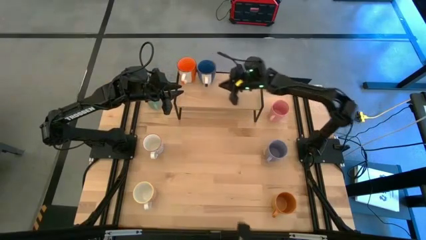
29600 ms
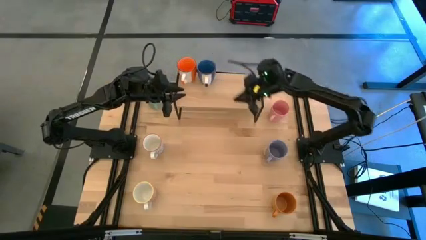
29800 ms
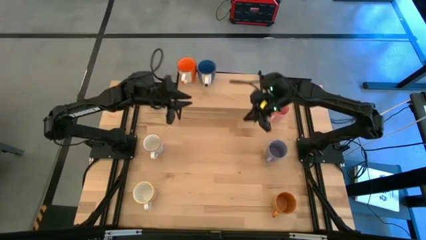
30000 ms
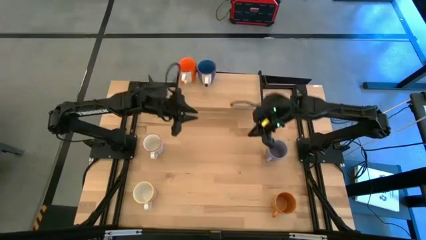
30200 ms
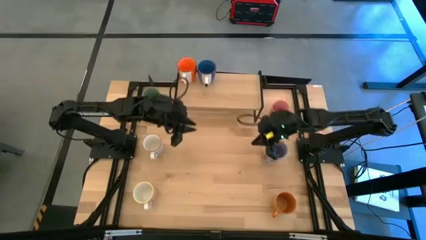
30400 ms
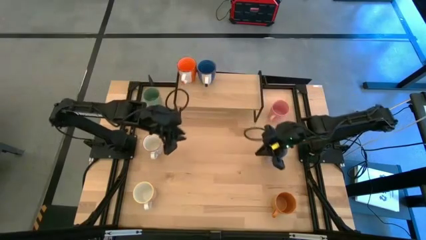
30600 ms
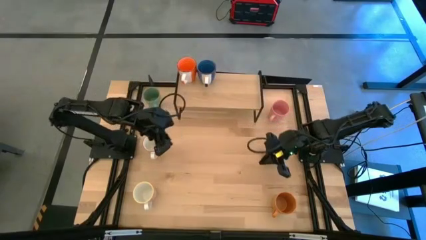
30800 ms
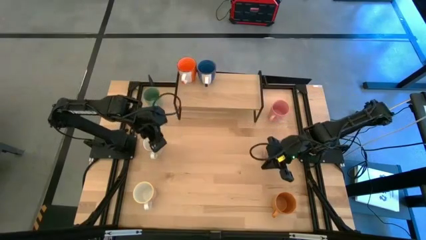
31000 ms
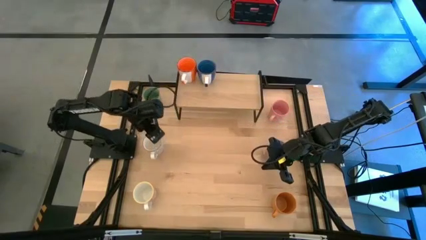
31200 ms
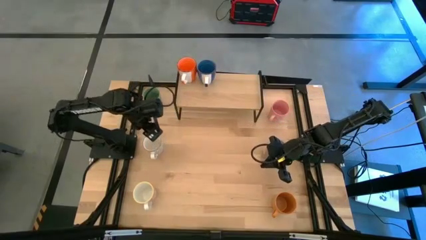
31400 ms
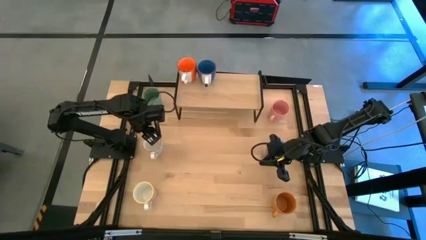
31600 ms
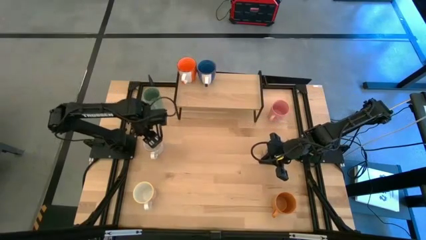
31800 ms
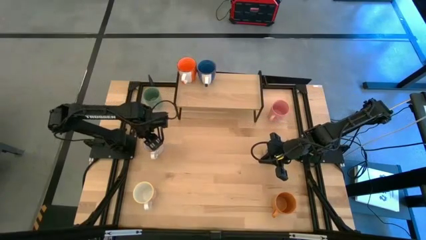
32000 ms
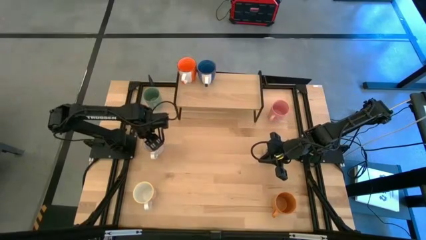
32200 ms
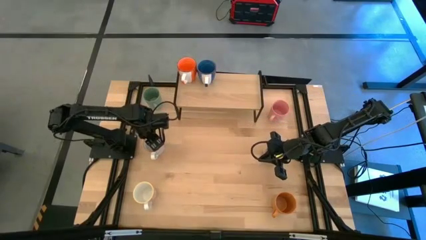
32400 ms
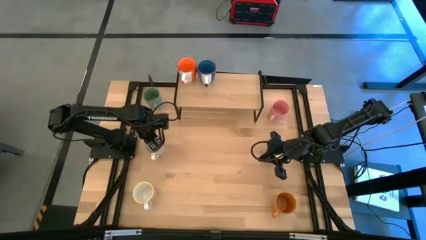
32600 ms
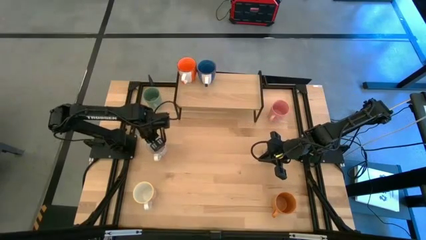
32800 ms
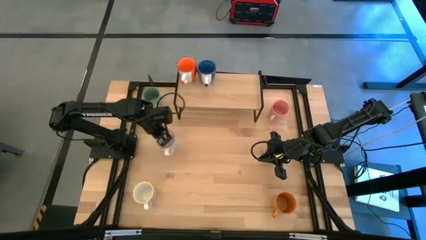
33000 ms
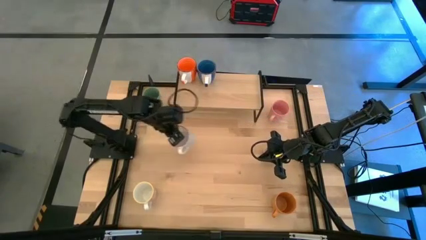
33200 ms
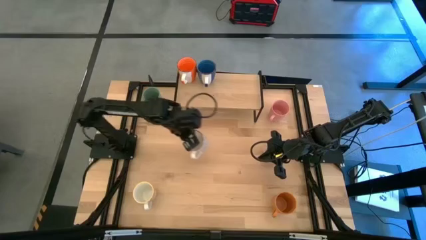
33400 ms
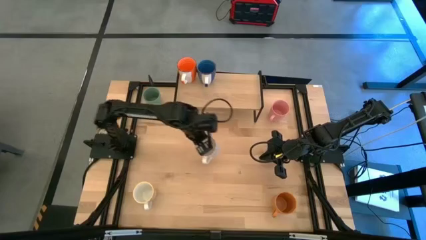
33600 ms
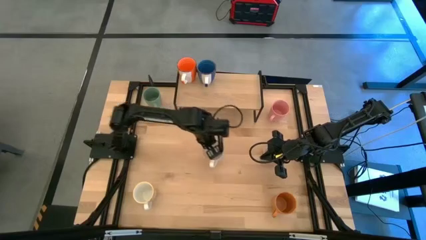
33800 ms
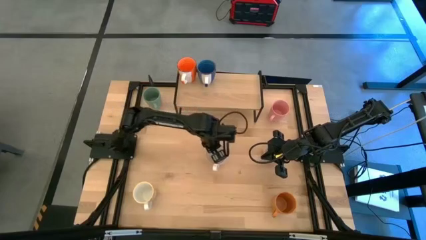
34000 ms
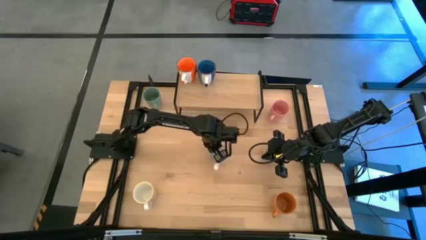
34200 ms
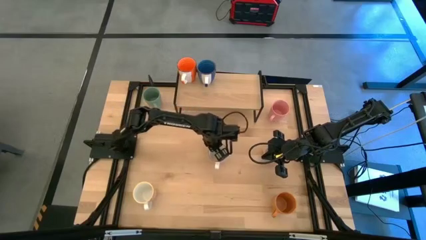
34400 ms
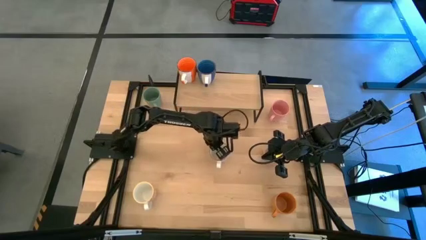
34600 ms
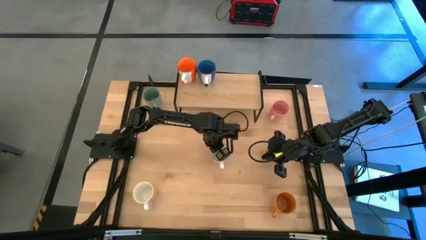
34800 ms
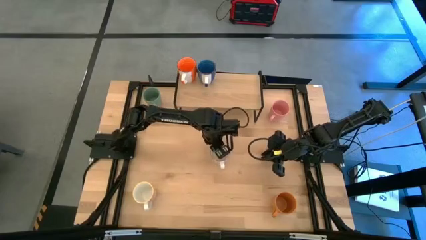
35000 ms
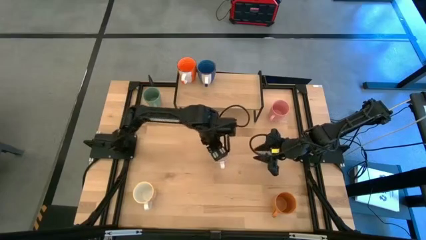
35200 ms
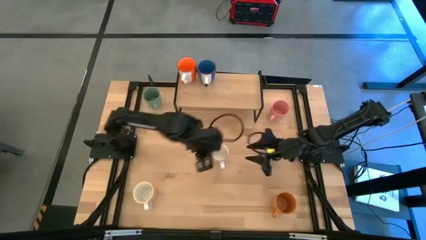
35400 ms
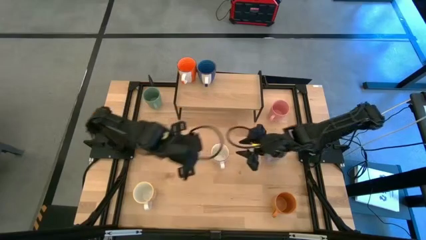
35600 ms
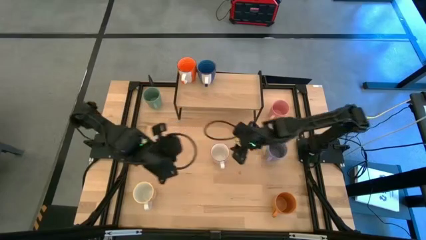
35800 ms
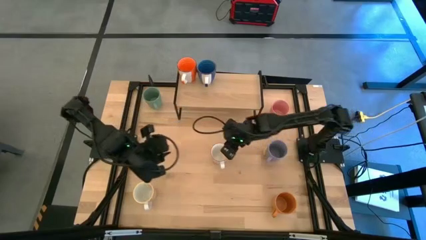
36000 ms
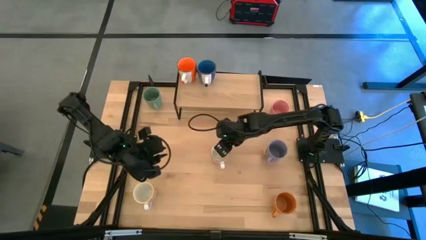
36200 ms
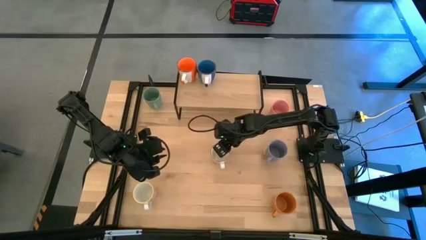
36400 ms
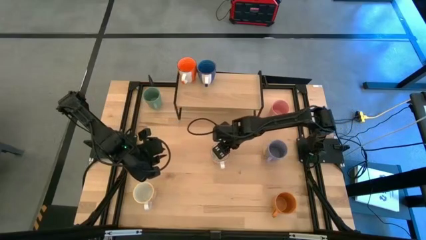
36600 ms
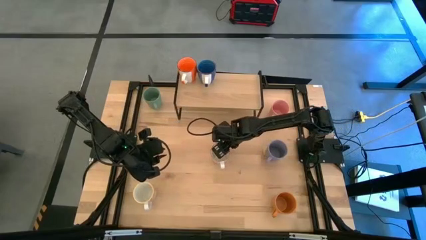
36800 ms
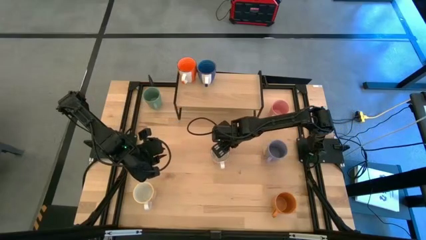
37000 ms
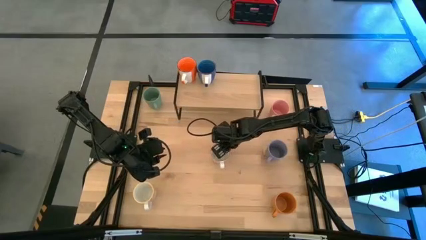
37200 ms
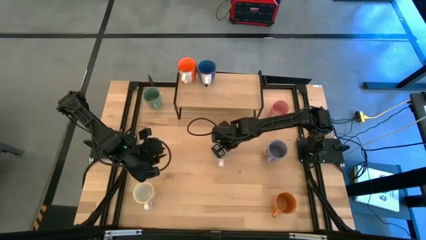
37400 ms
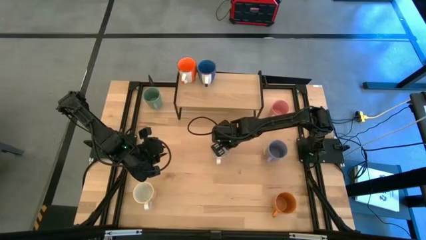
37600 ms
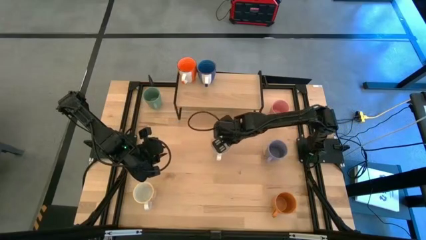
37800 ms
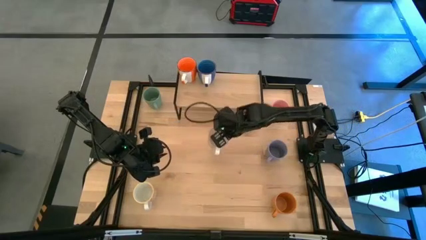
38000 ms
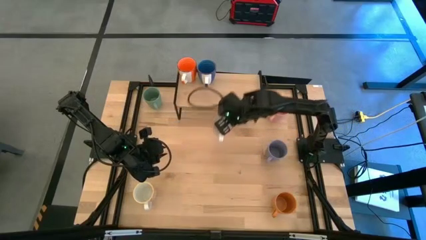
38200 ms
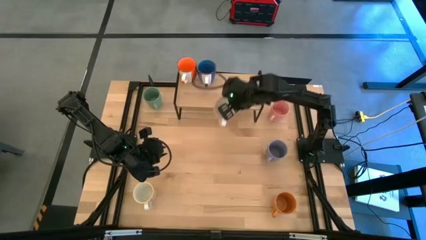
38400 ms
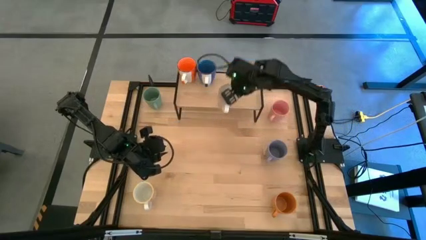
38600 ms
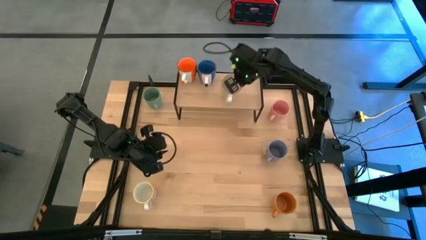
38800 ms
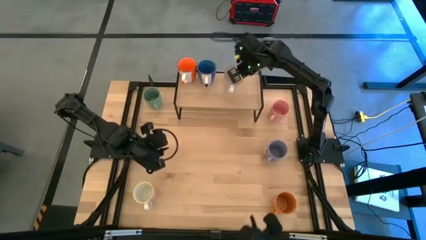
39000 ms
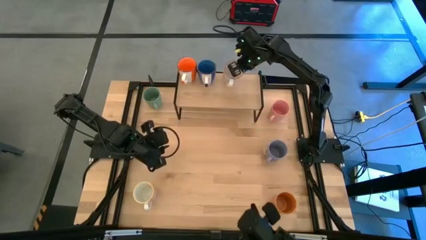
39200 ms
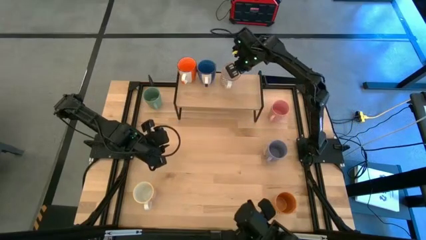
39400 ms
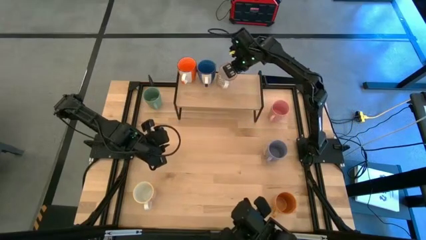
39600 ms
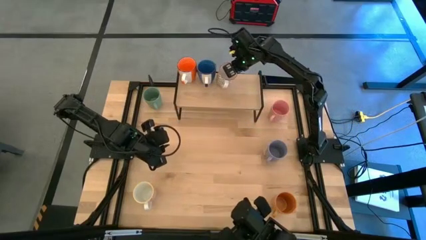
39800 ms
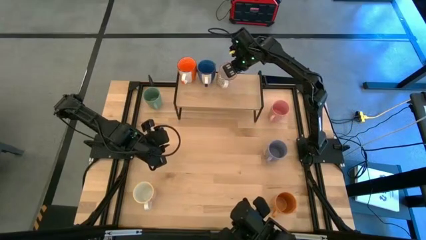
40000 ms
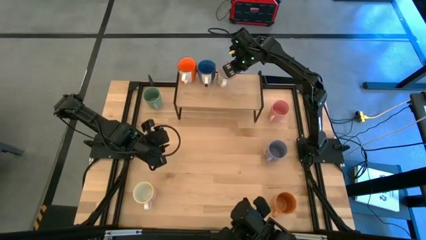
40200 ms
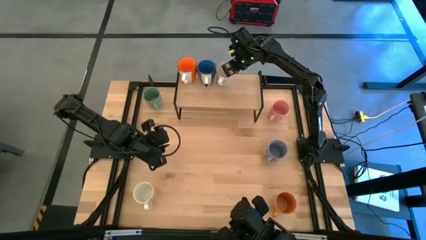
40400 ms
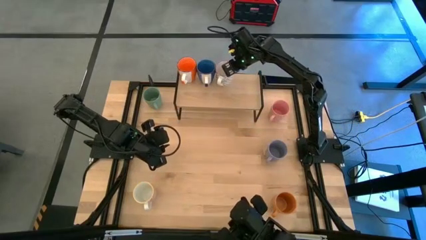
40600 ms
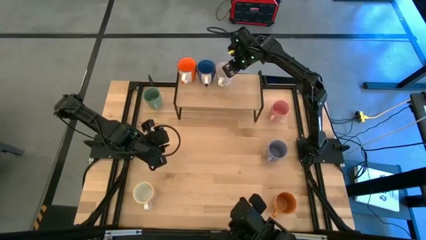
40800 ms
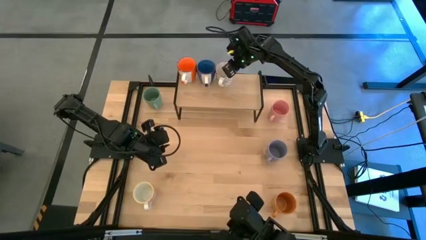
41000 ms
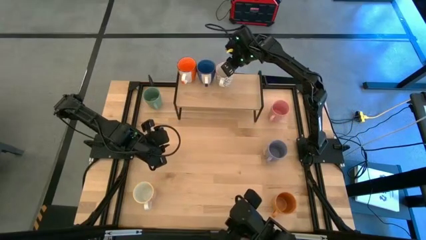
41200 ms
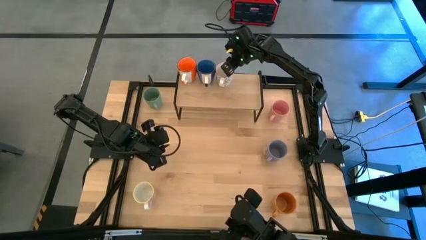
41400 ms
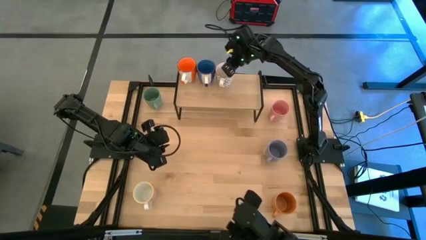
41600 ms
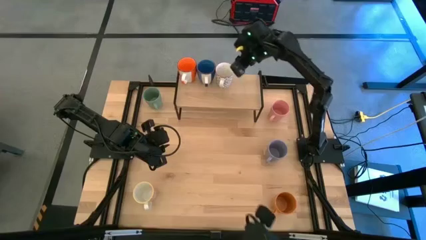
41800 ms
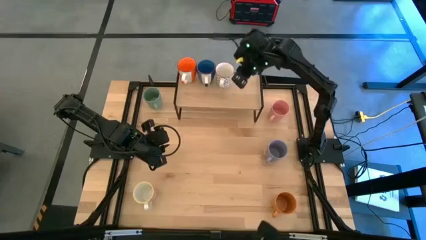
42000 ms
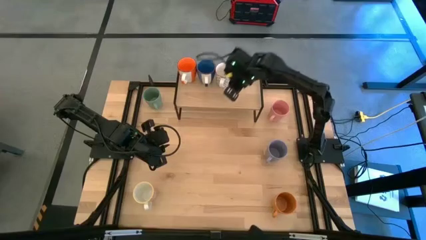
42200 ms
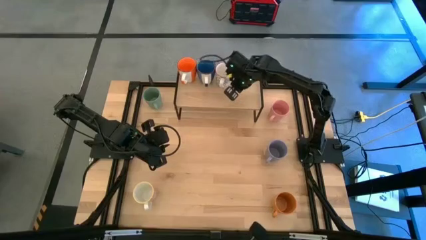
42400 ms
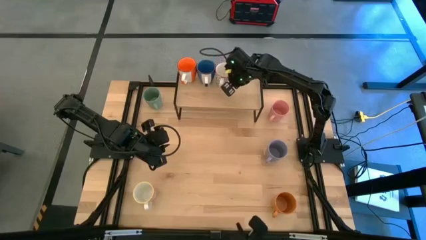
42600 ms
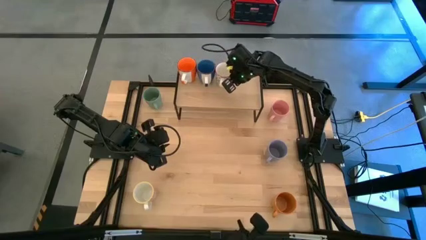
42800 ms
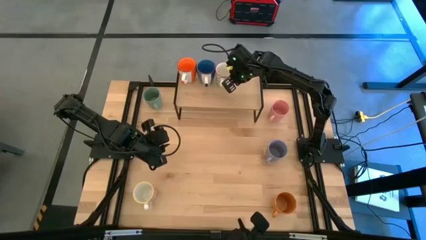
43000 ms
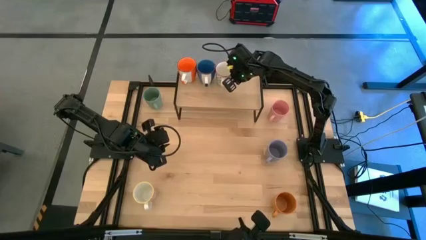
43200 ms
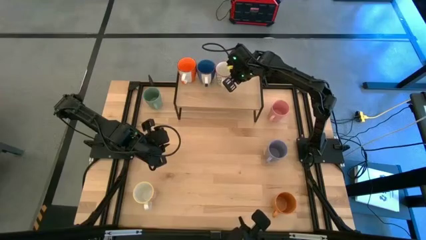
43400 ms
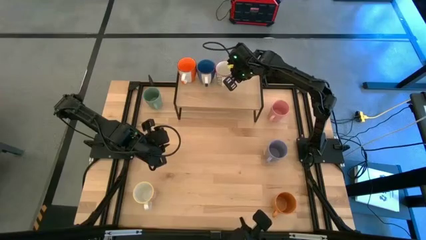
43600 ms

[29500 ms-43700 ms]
Task: Place coffee mugs
Put the gray pattern mug on the shelf

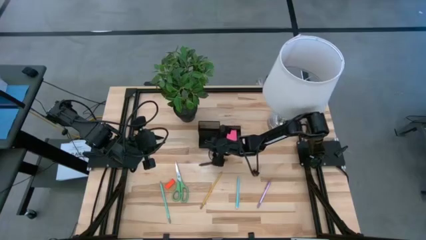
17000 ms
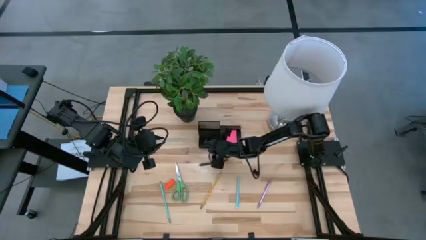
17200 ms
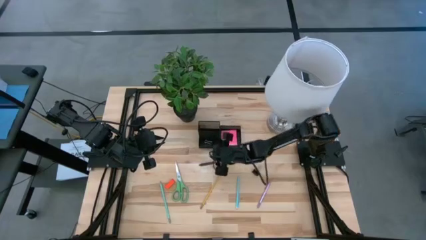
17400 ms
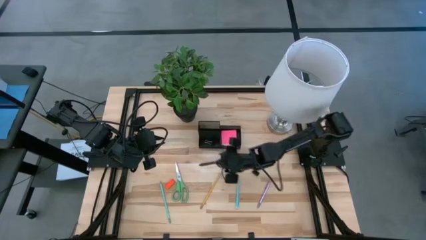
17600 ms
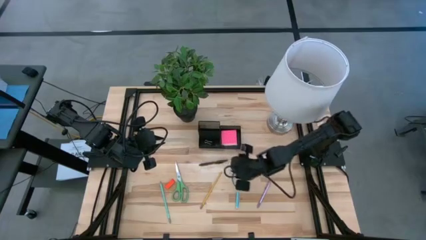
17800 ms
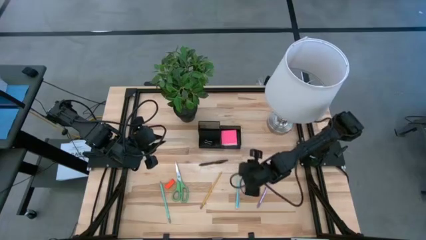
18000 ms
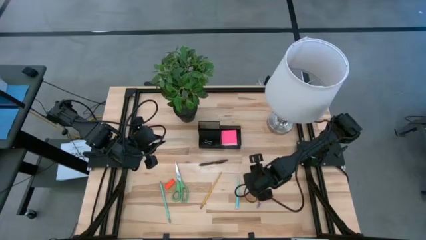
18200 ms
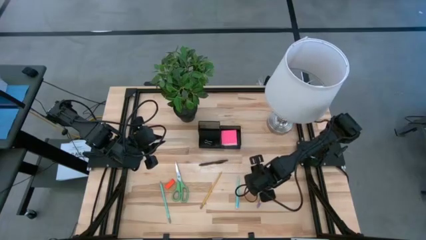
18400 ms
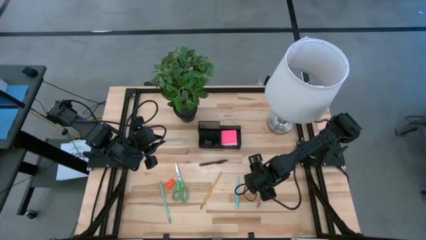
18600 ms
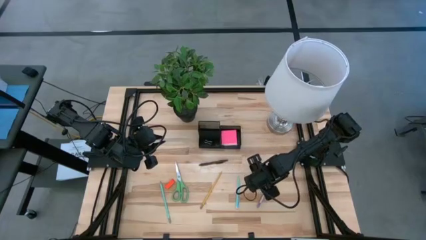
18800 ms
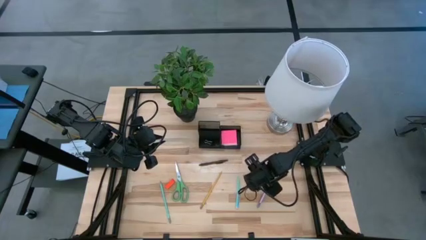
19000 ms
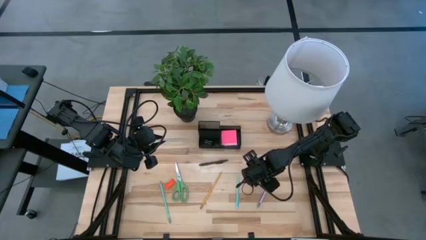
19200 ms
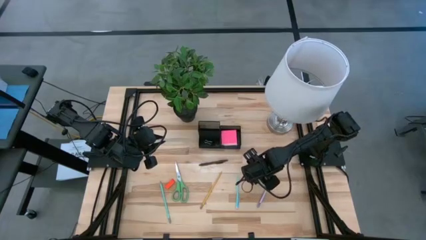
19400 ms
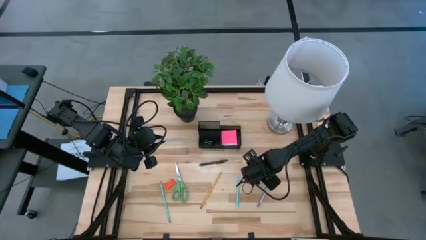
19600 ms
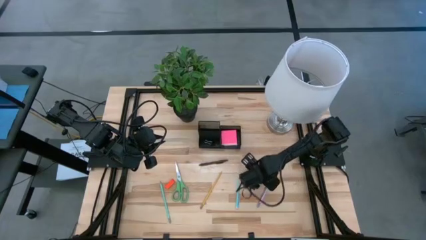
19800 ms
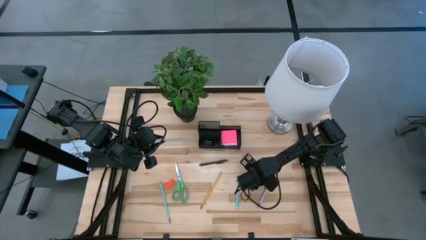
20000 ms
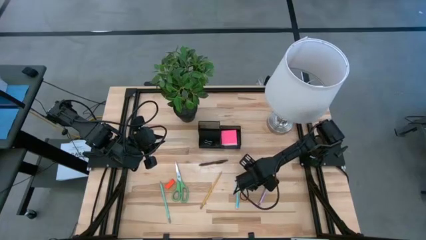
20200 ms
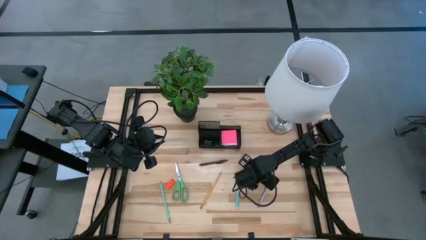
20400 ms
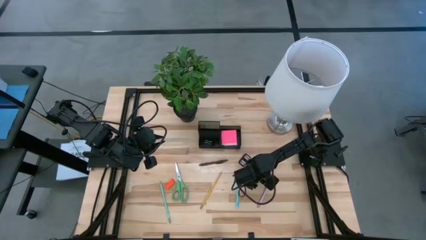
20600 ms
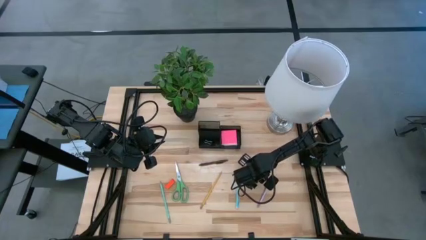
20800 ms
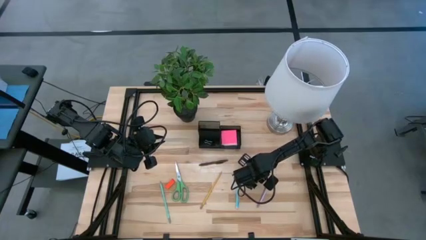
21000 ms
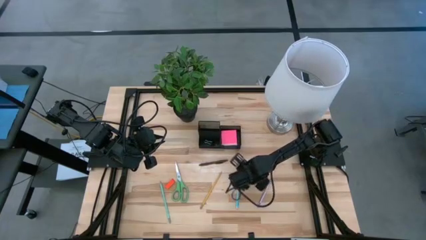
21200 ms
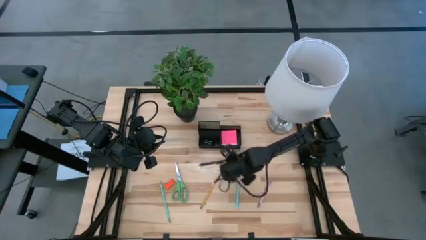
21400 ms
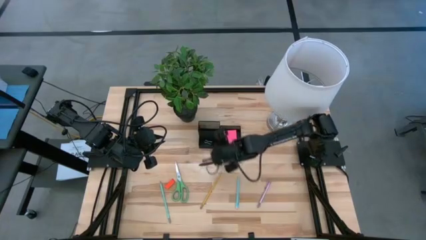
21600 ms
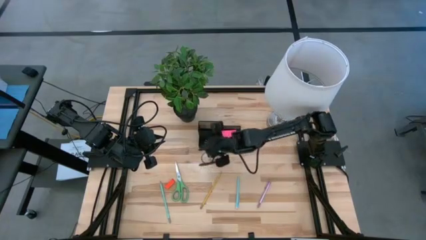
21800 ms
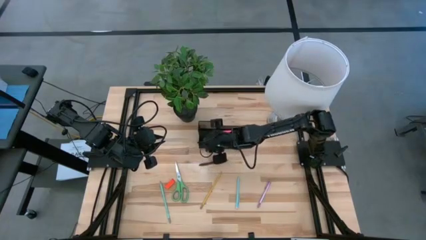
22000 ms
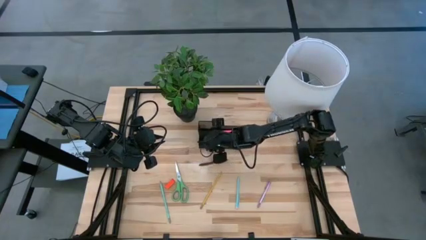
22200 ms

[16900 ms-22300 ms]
Task: Pick and place office supplies into organizer
Put the black binder clip into the black desk organizer
